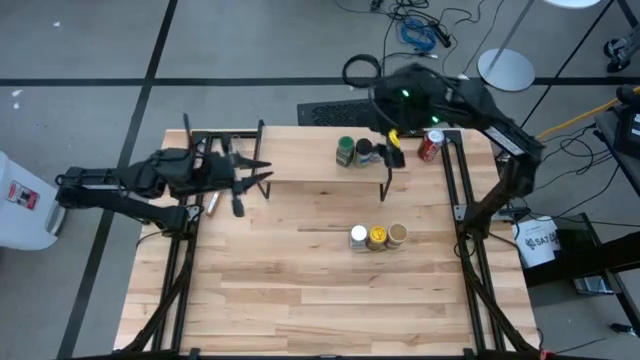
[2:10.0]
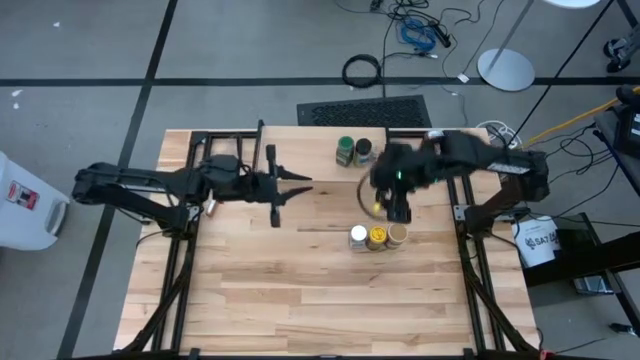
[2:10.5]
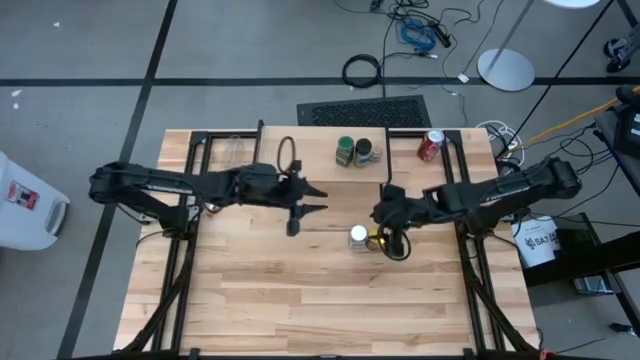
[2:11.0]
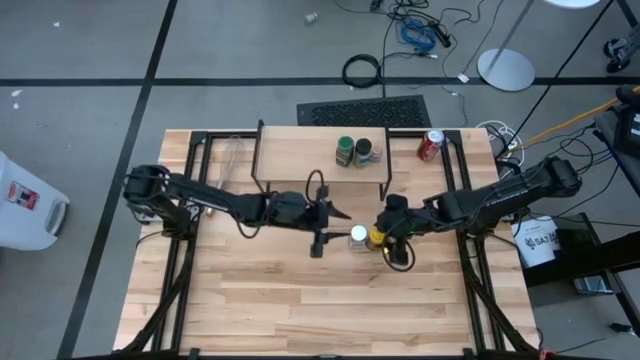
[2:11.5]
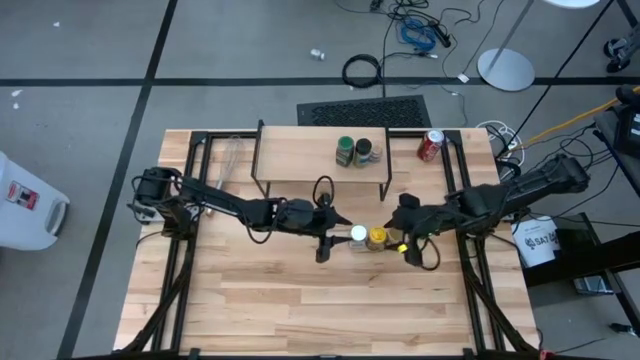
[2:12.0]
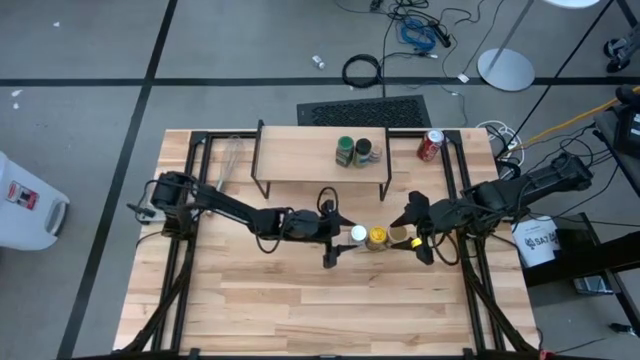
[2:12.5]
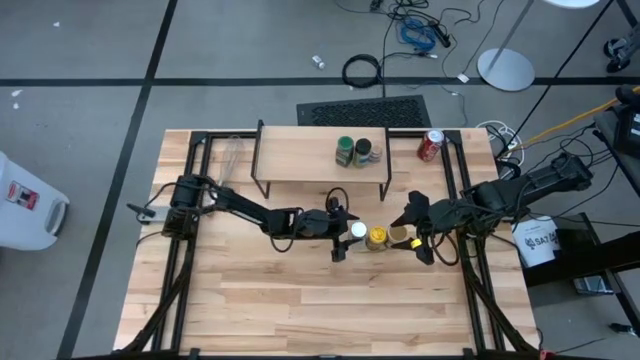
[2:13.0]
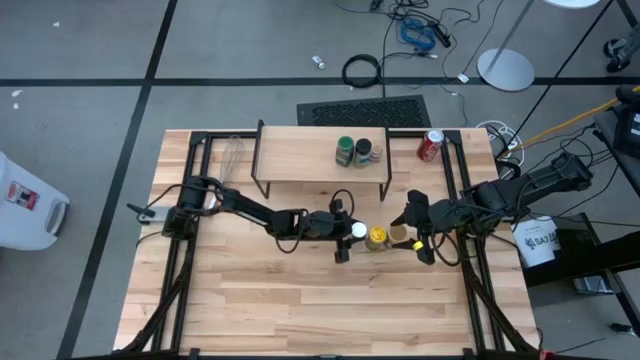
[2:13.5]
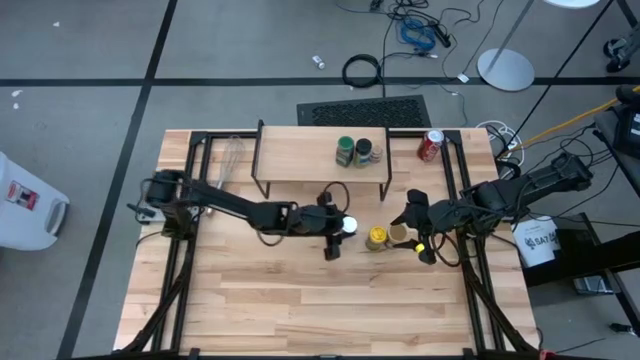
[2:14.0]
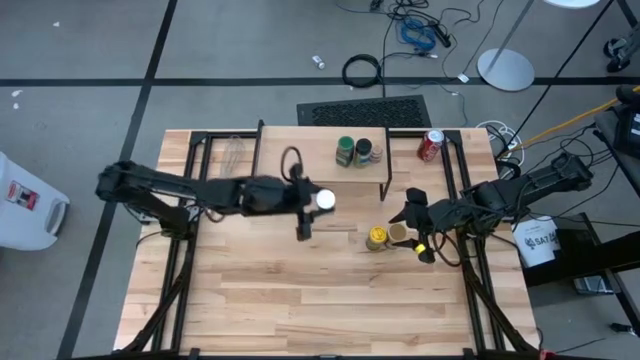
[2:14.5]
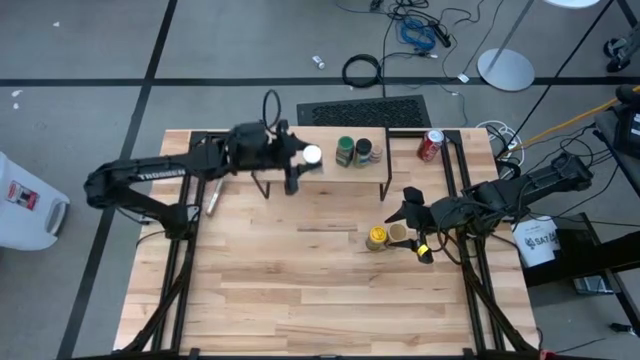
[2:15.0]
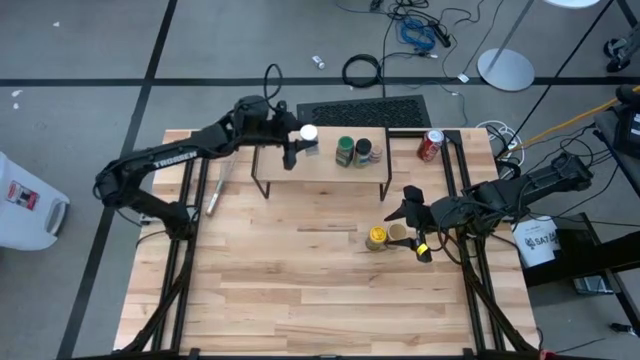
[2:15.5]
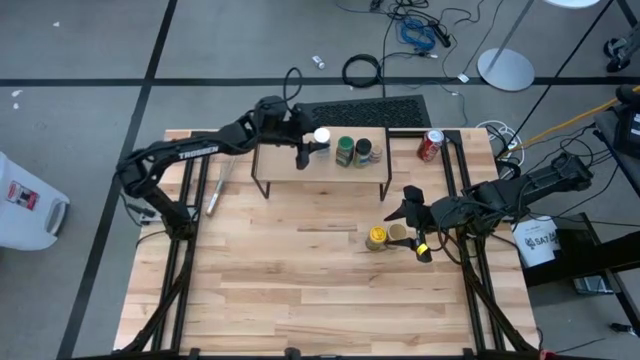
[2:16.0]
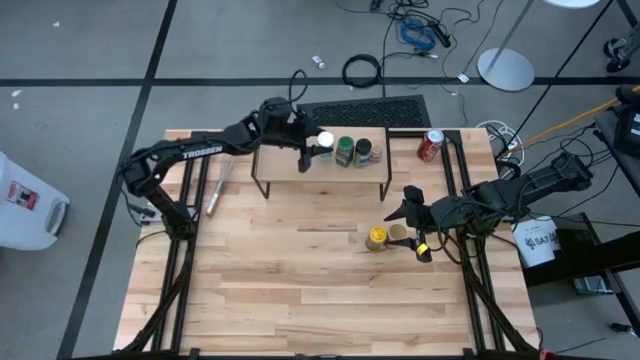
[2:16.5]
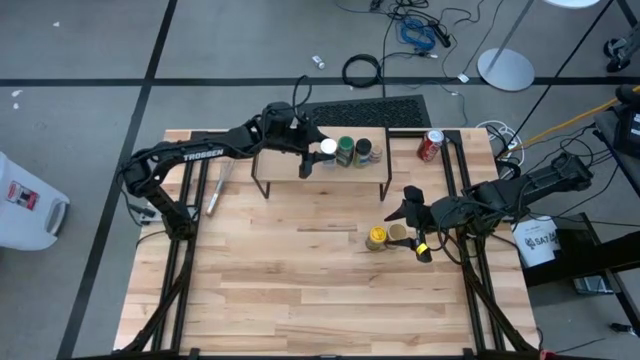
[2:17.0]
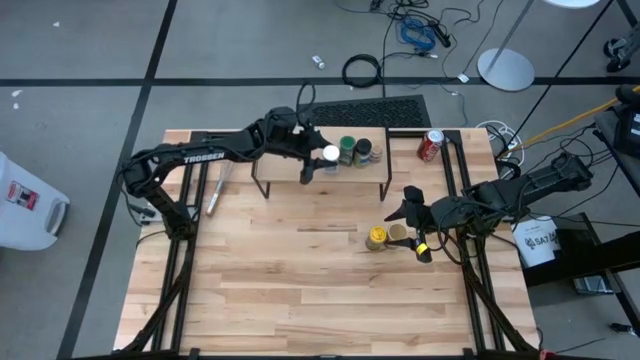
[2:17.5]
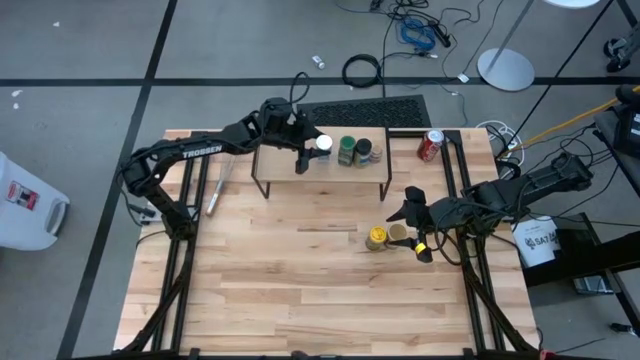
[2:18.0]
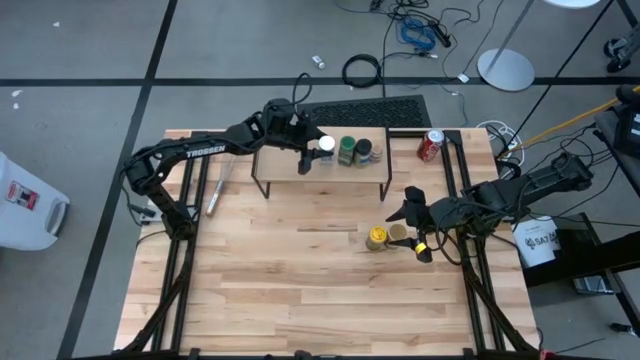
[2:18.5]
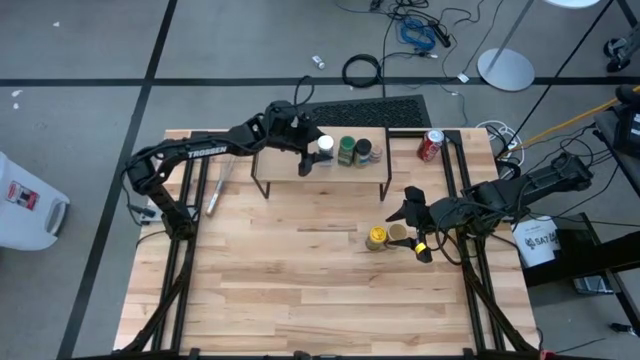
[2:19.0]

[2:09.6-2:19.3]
Task: Shelf spices
Put the white seasoning bottle on the shelf

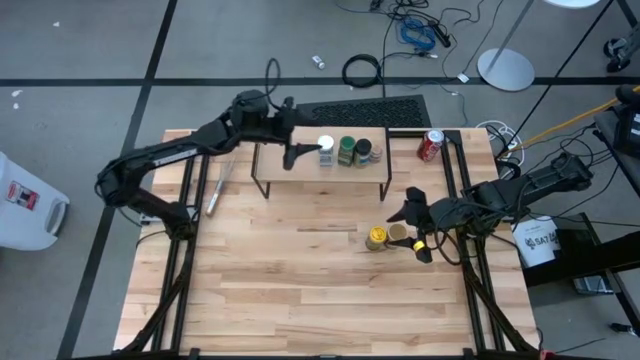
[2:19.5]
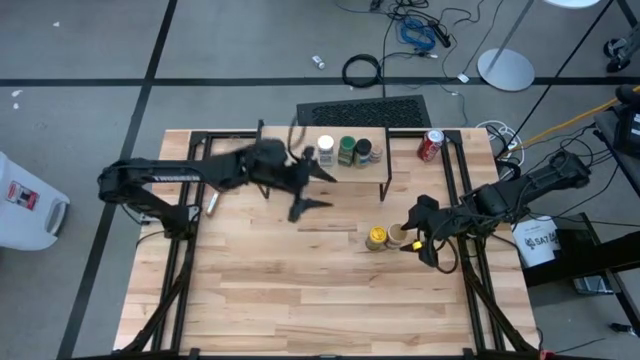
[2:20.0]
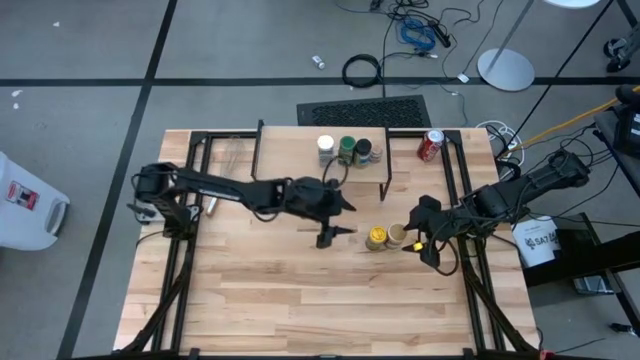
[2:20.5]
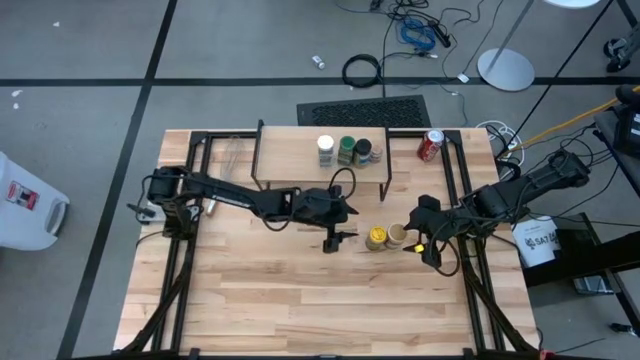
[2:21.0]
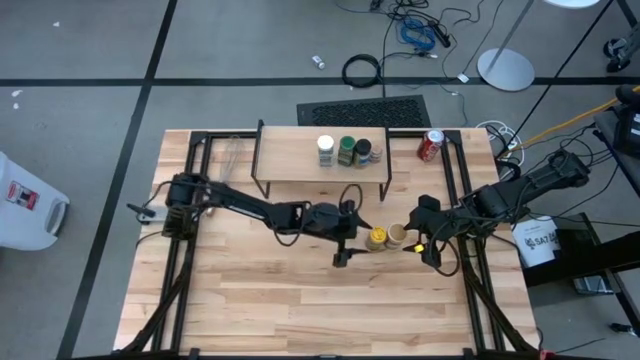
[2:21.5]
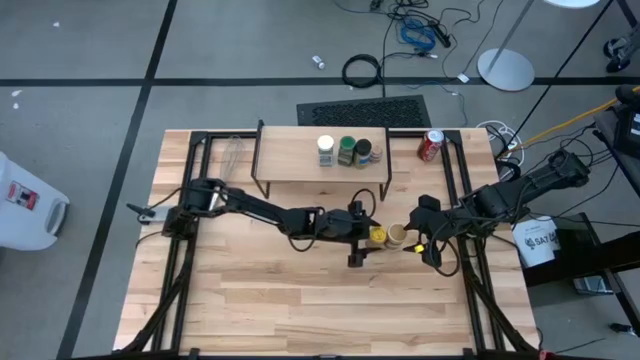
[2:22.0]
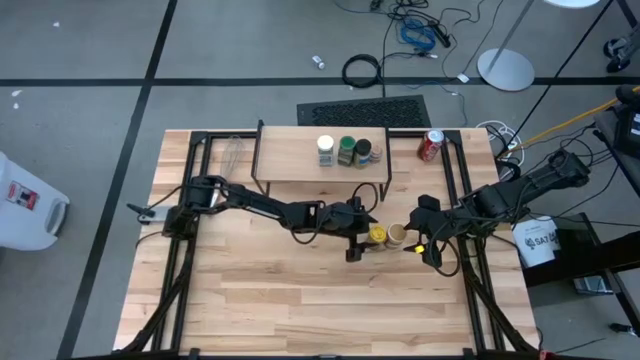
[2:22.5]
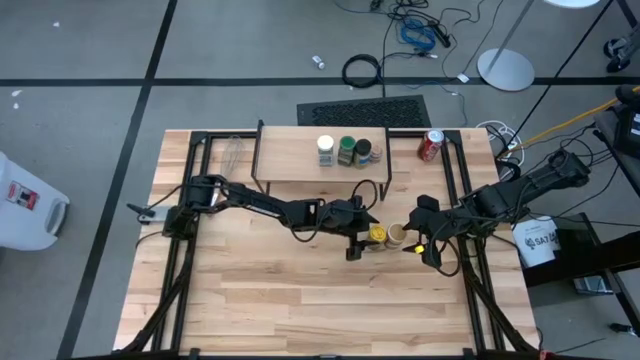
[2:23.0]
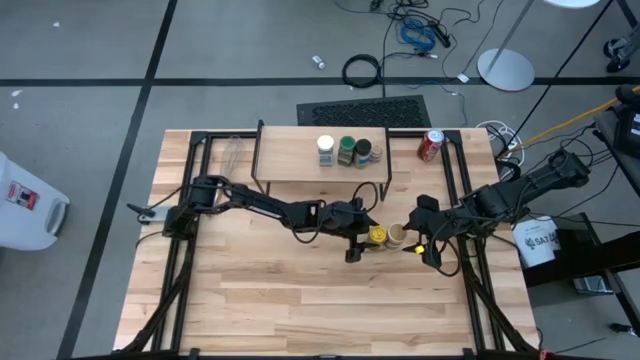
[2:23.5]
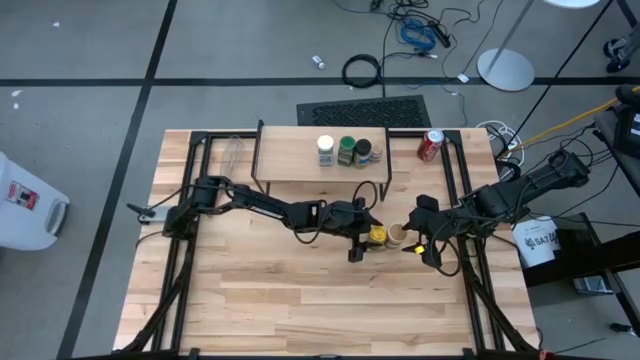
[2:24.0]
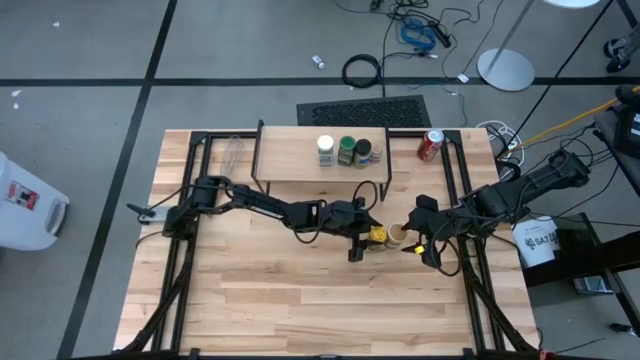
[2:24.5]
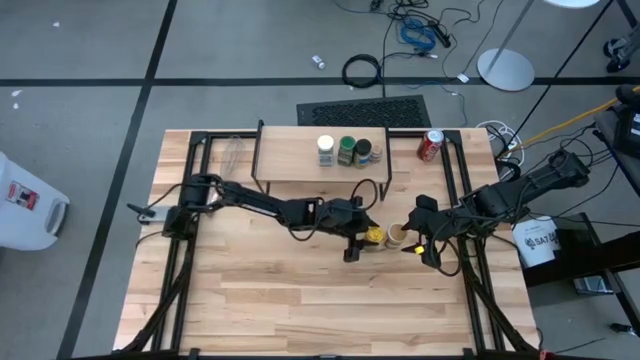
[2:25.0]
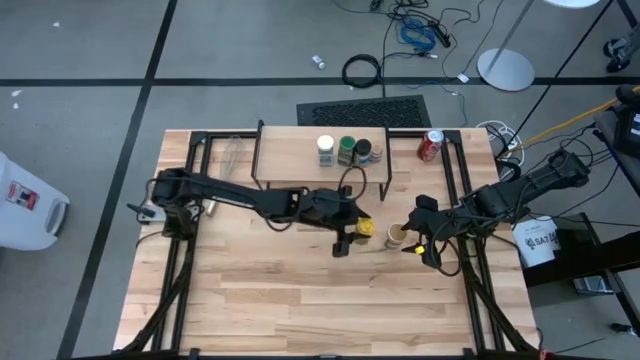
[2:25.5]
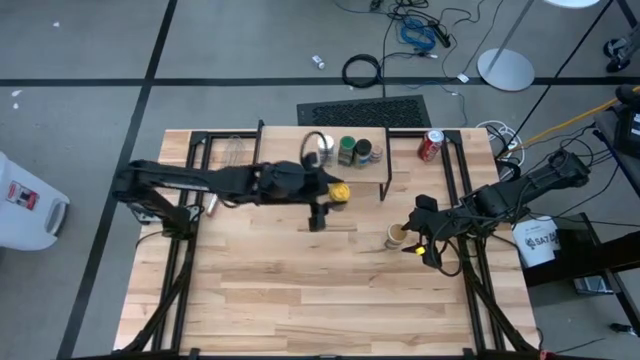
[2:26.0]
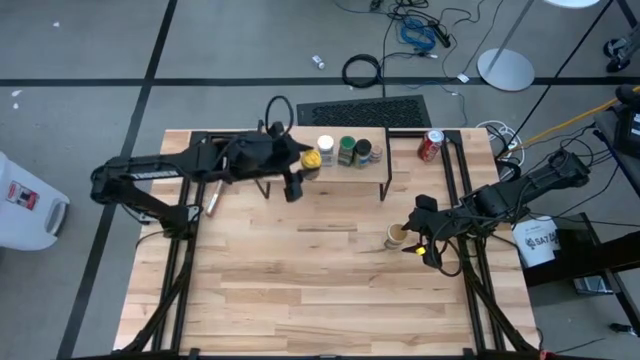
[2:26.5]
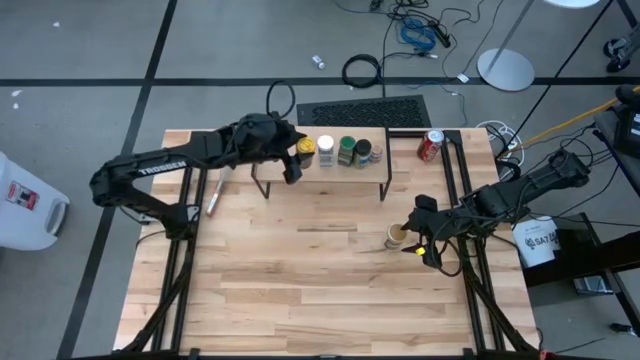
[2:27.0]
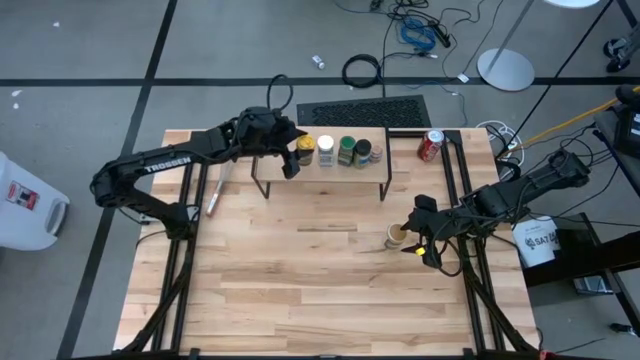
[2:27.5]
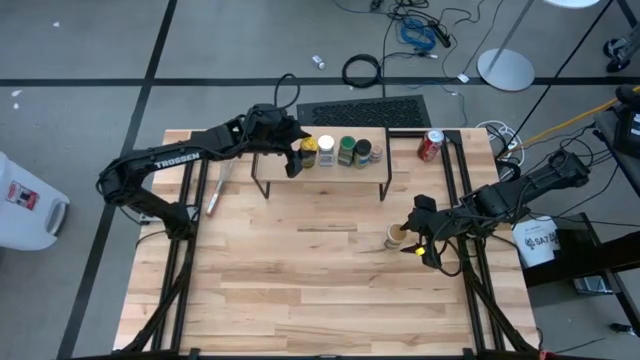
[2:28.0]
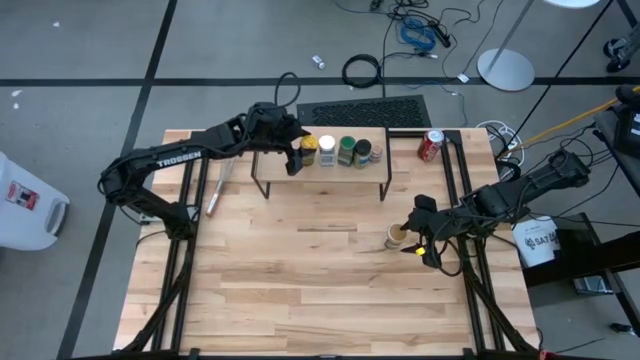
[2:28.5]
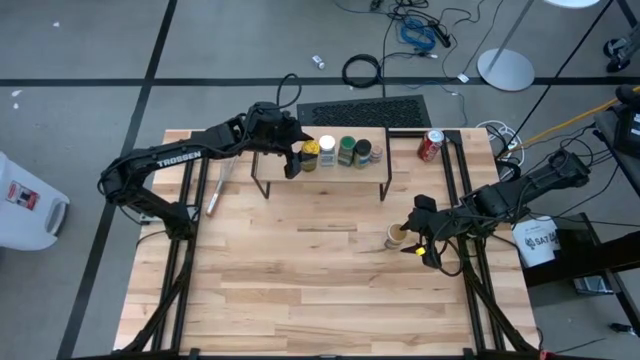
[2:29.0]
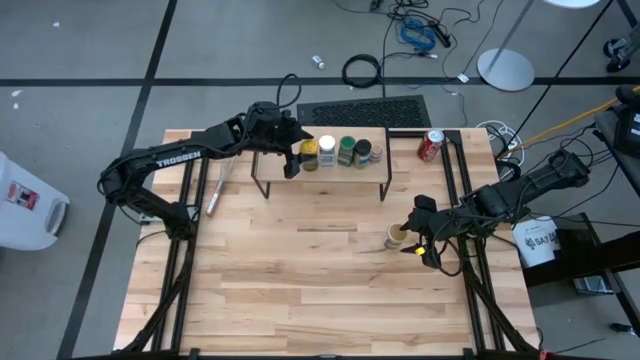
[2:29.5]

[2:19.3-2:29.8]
Put the yellow seasoning bottle on the shelf

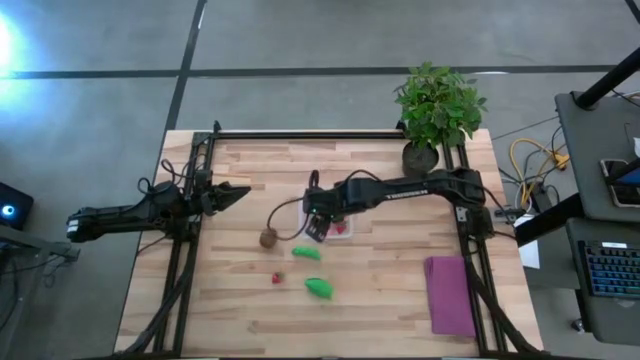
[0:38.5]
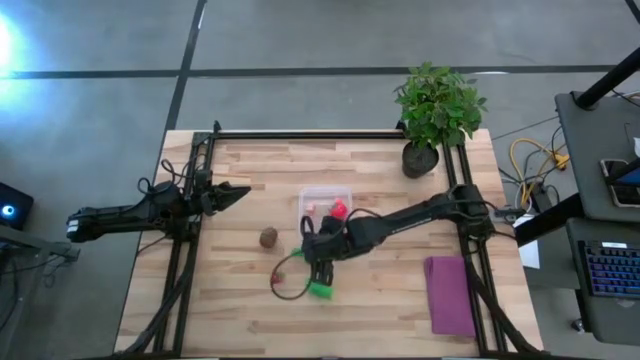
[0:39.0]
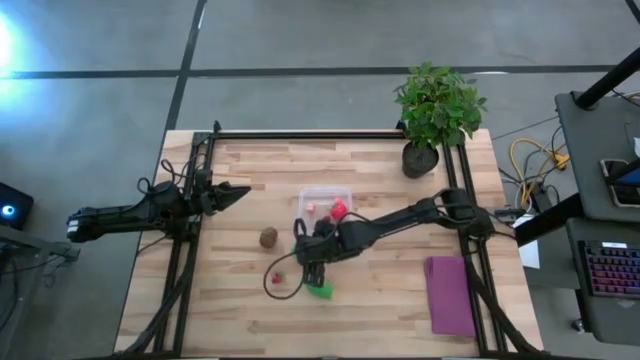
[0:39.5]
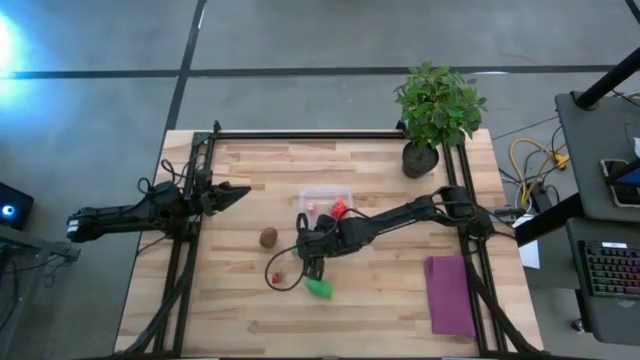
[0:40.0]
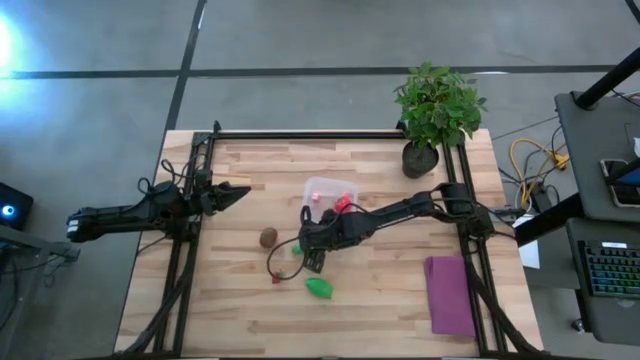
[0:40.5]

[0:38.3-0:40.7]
Task: Pick and placing Produce into tupperware
Adjust the transparent bin on the table
